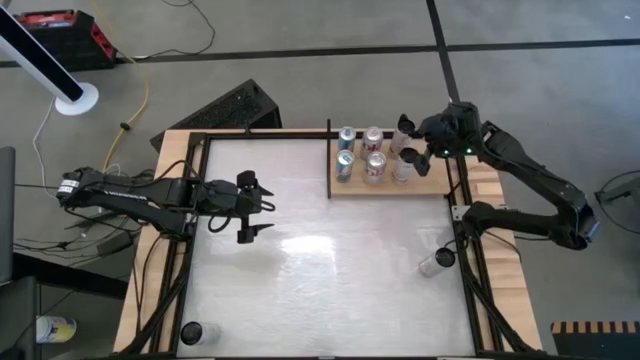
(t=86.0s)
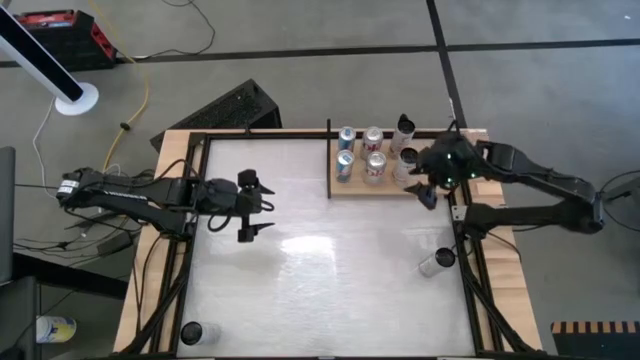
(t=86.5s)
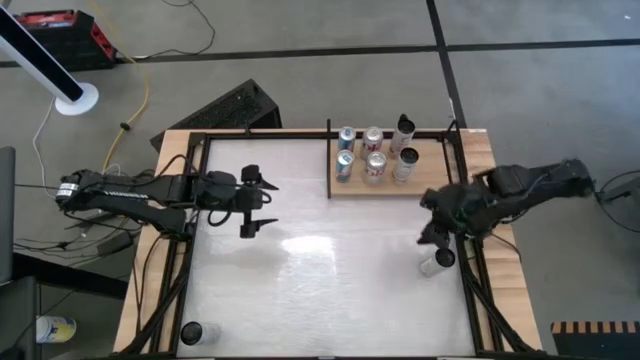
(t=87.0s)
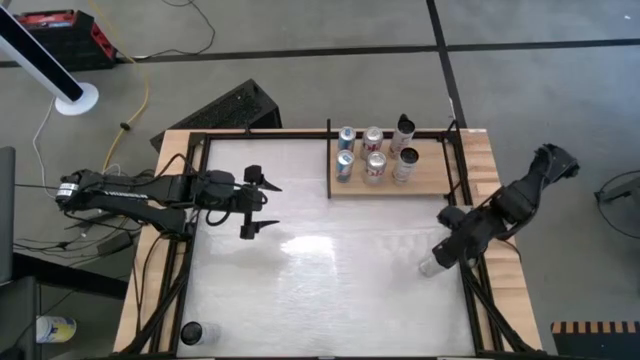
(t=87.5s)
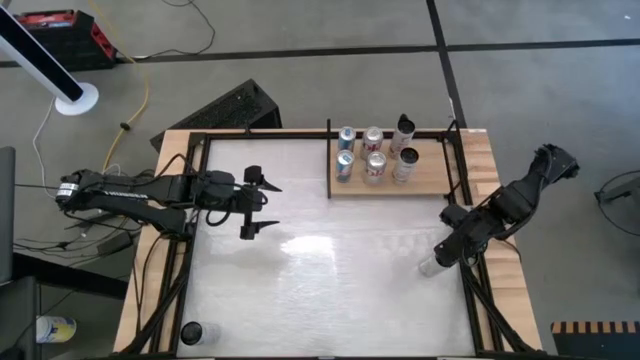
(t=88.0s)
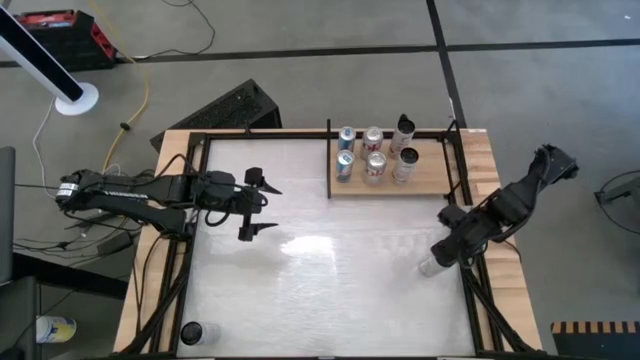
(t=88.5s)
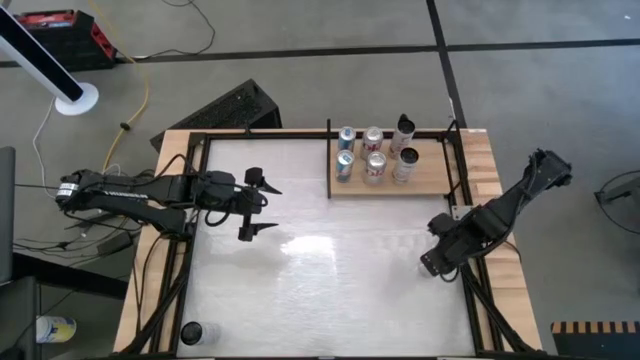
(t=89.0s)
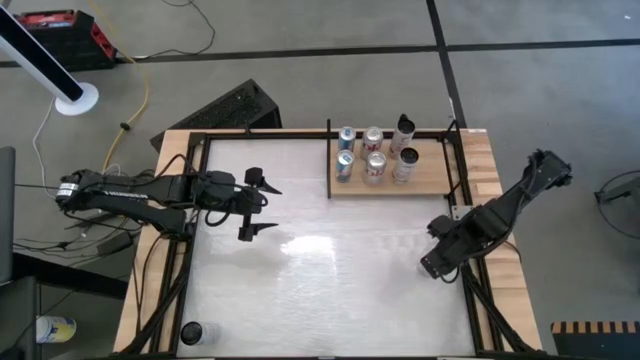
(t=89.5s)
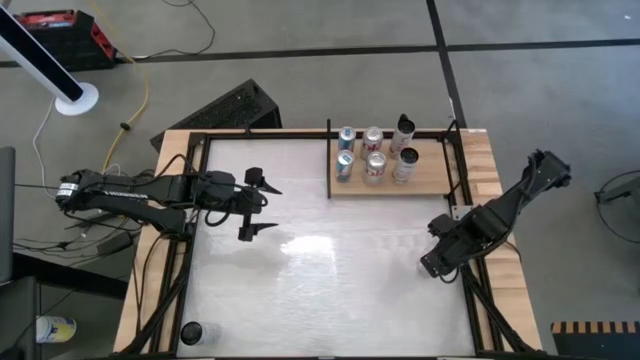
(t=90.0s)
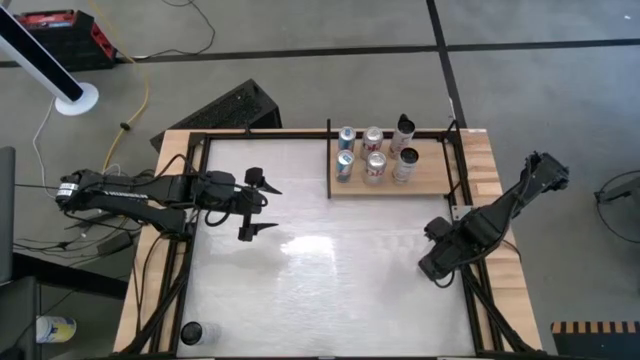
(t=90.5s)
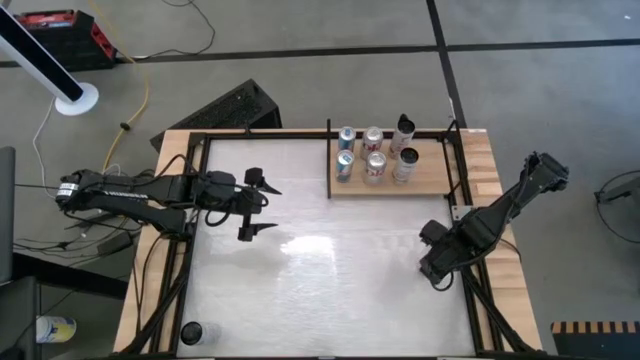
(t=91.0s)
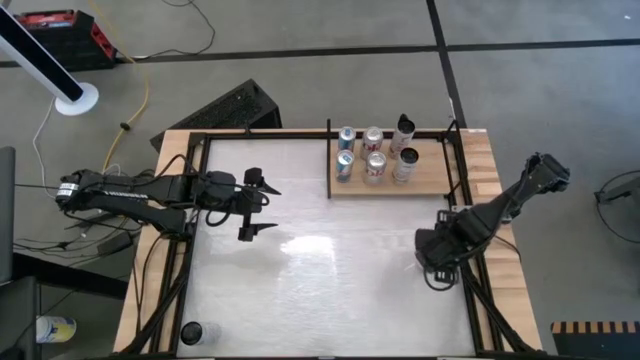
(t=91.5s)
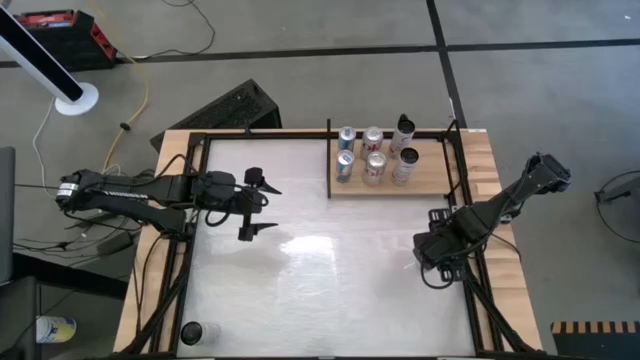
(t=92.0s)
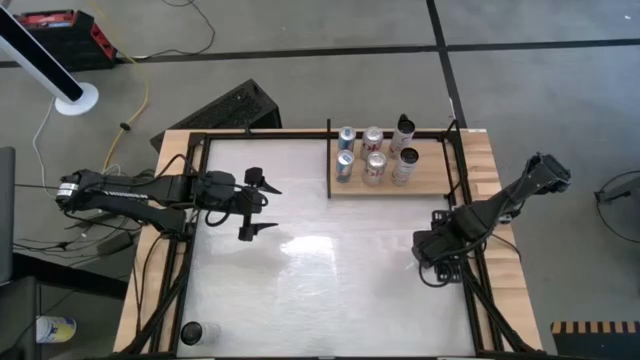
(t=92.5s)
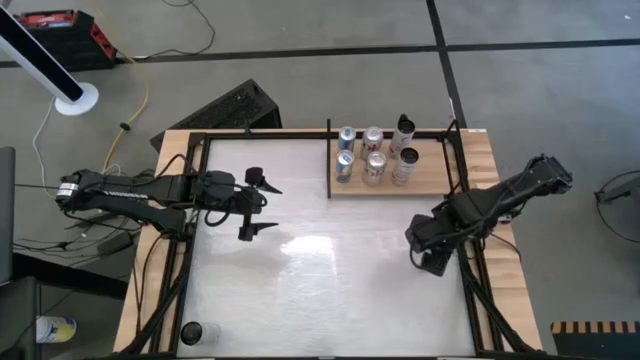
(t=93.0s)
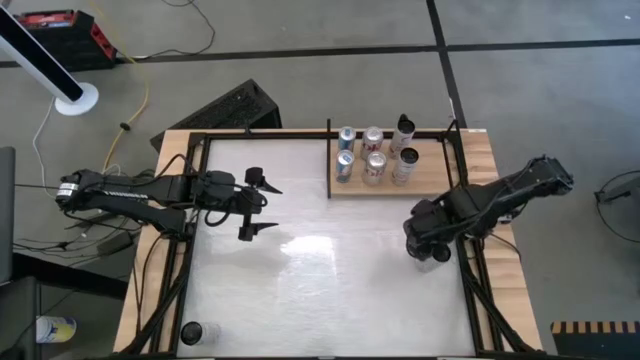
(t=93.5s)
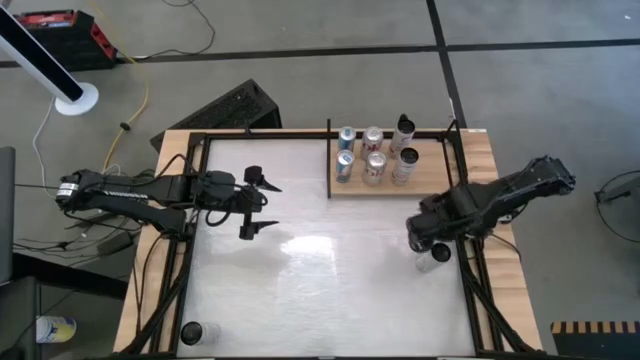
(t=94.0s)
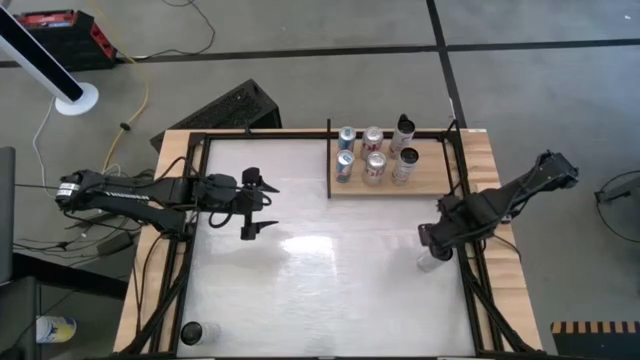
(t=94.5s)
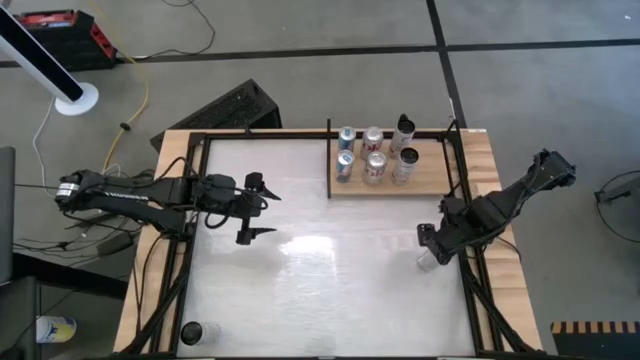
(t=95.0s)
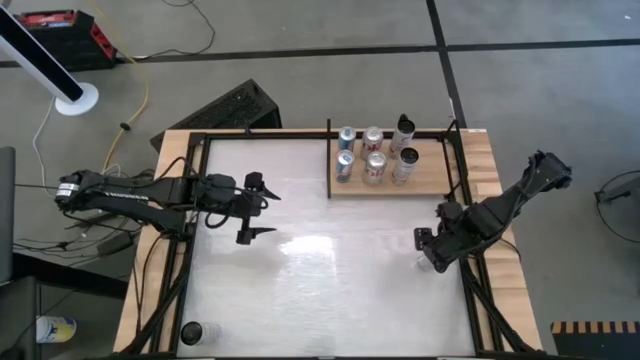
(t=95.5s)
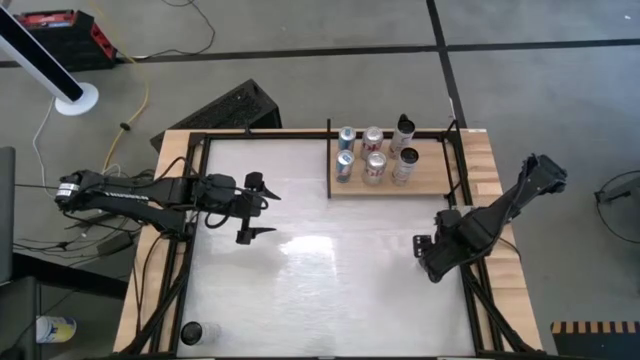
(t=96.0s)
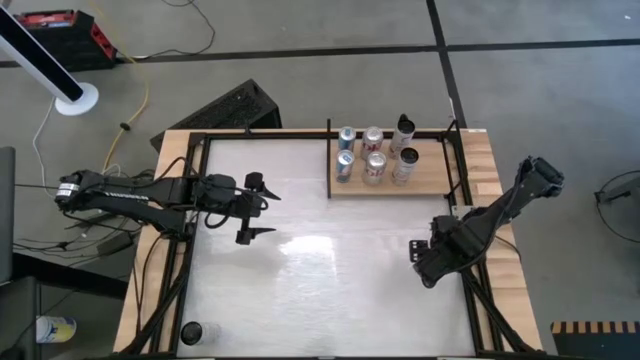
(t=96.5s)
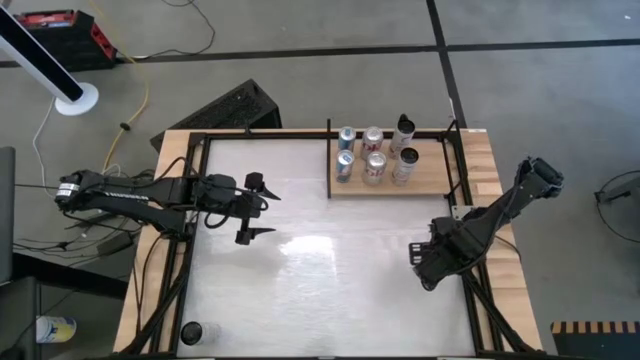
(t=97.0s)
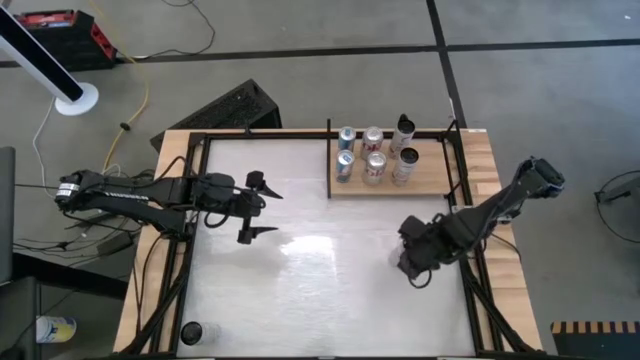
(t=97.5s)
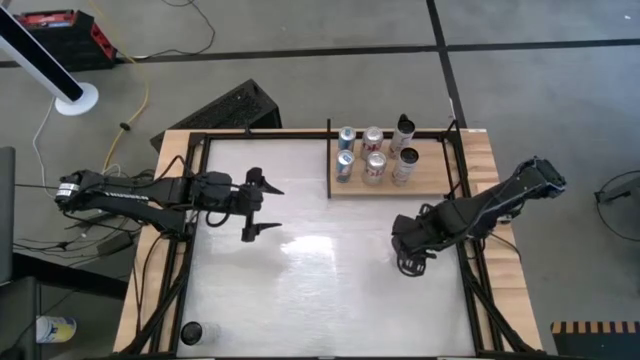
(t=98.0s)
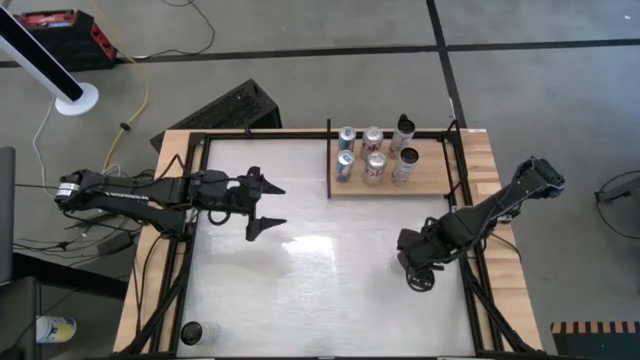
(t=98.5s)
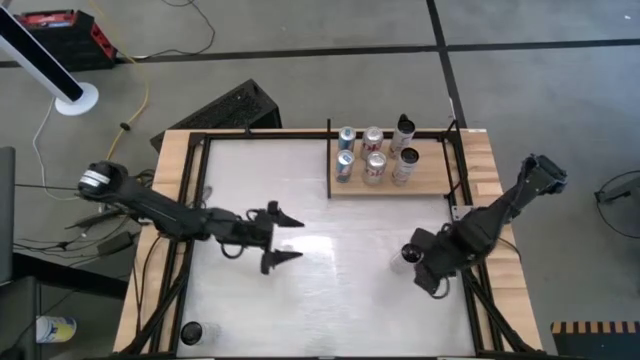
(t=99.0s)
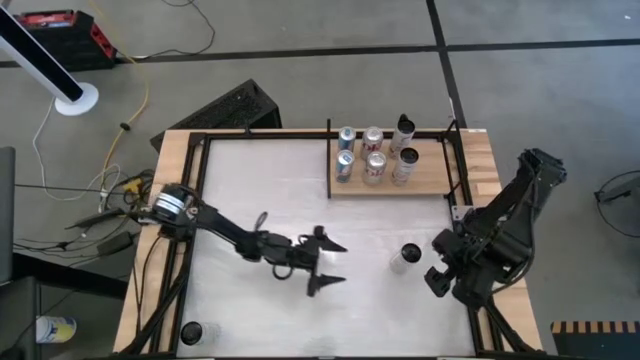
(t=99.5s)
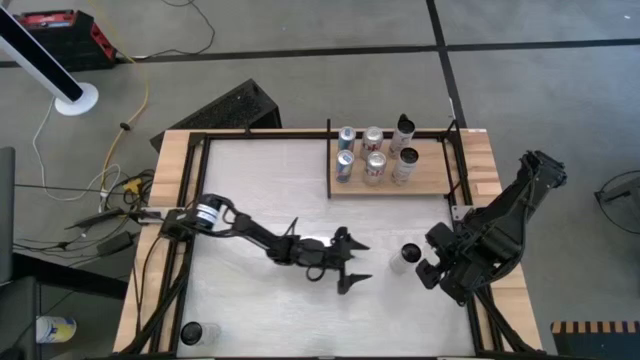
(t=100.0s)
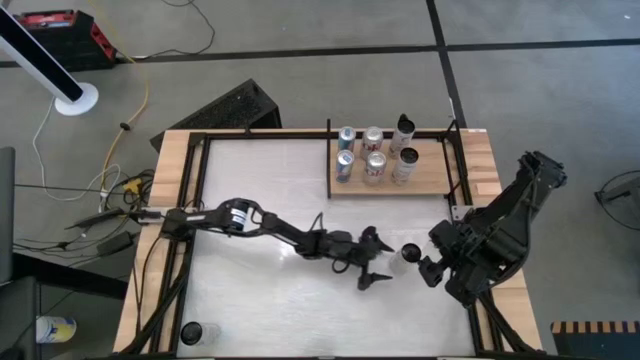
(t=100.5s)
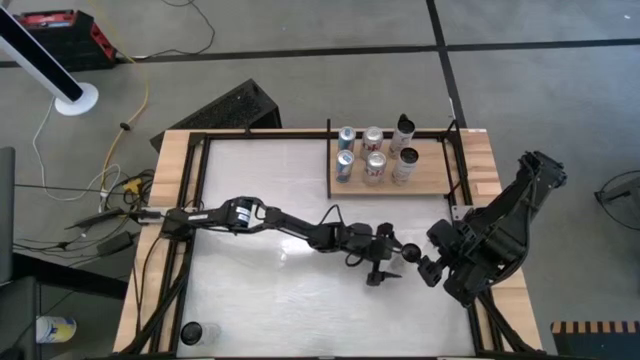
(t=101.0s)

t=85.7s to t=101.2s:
Task: Place canned beverage on shelf
Put the right white-yellow soda can

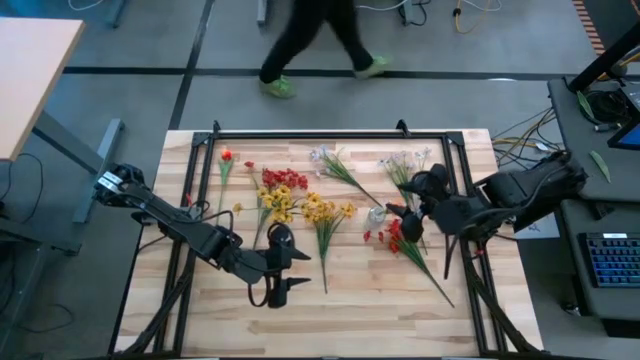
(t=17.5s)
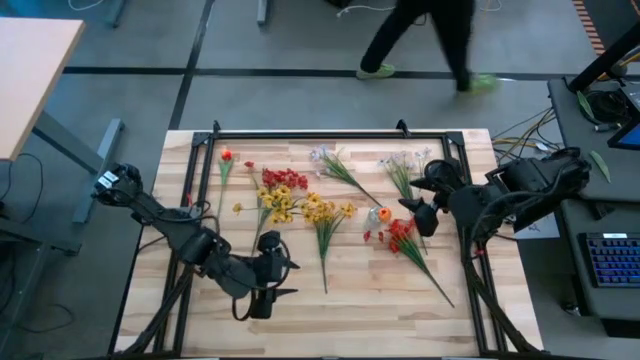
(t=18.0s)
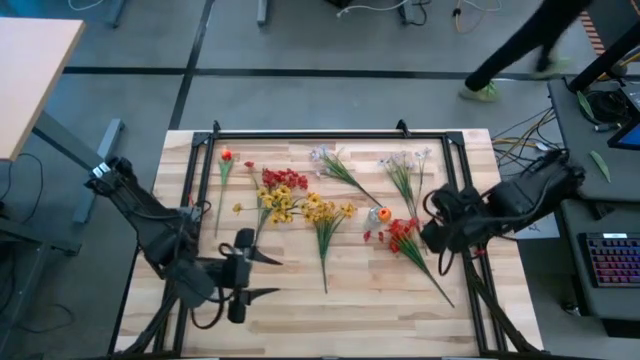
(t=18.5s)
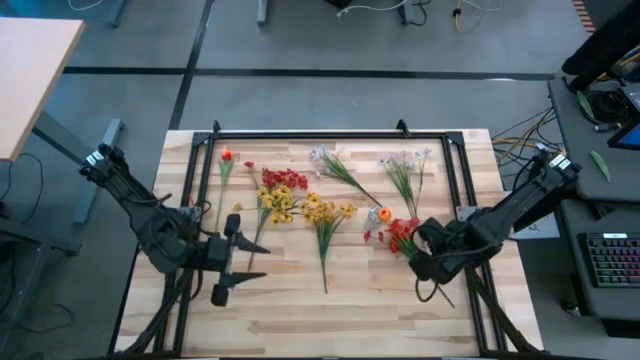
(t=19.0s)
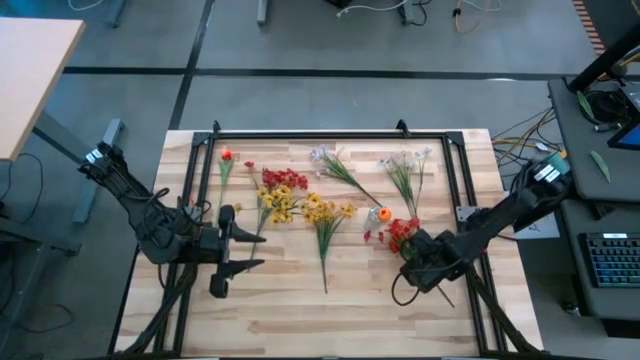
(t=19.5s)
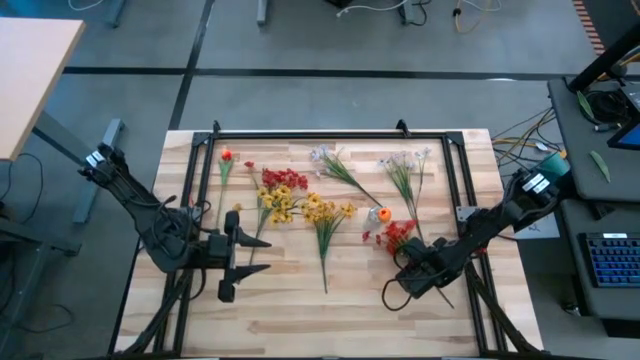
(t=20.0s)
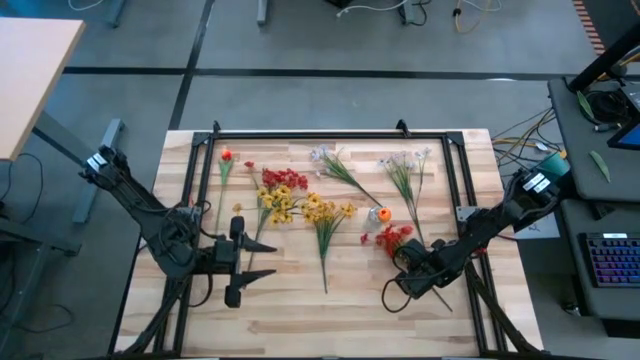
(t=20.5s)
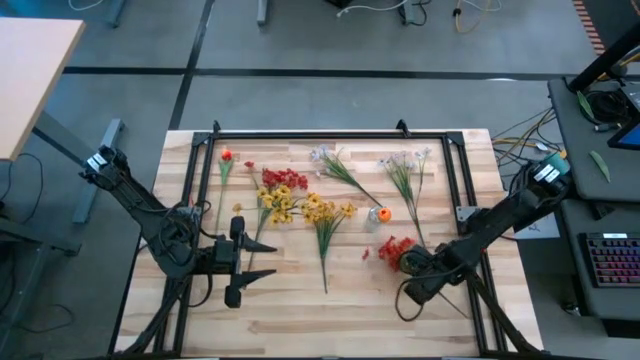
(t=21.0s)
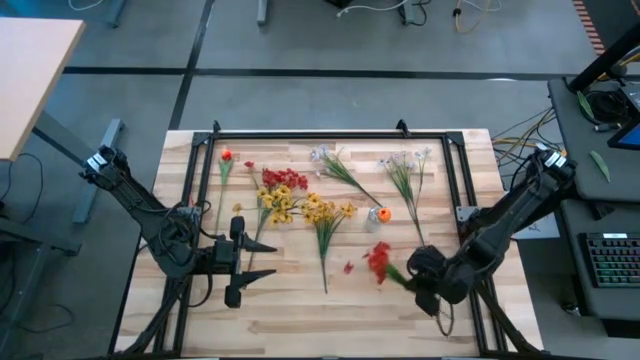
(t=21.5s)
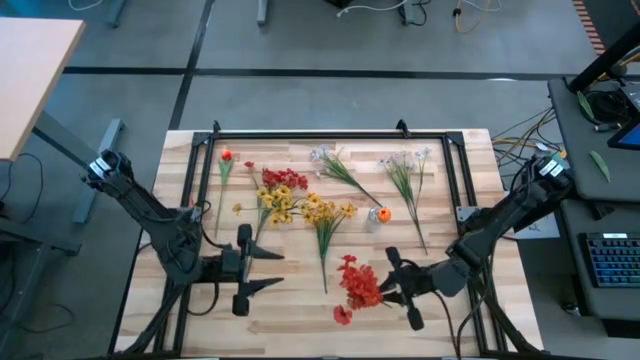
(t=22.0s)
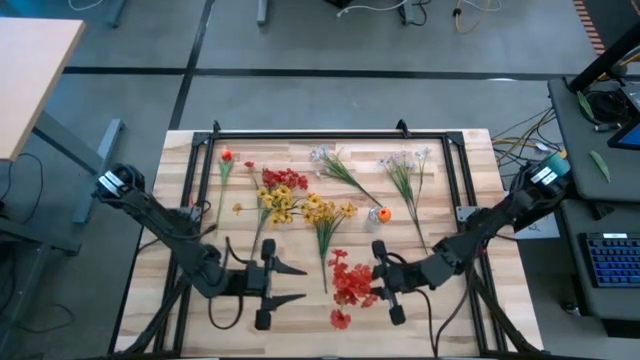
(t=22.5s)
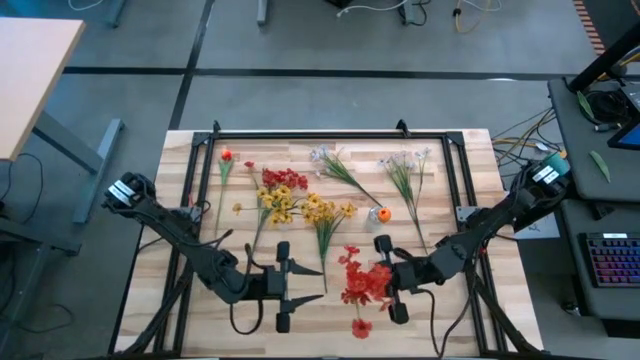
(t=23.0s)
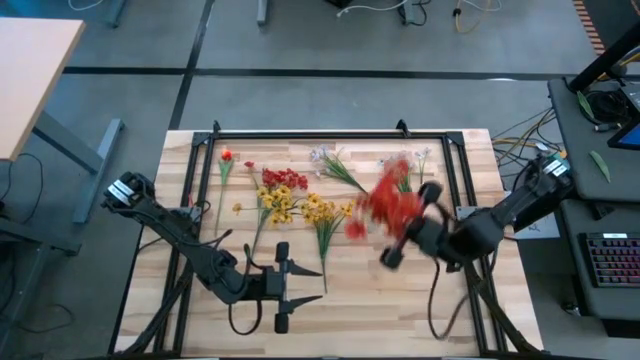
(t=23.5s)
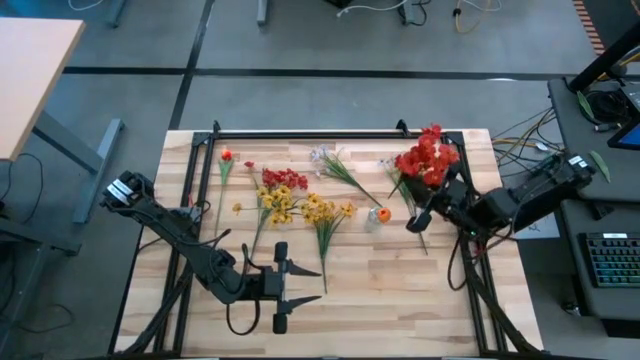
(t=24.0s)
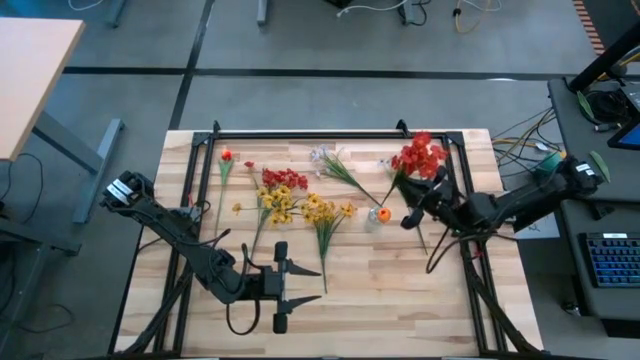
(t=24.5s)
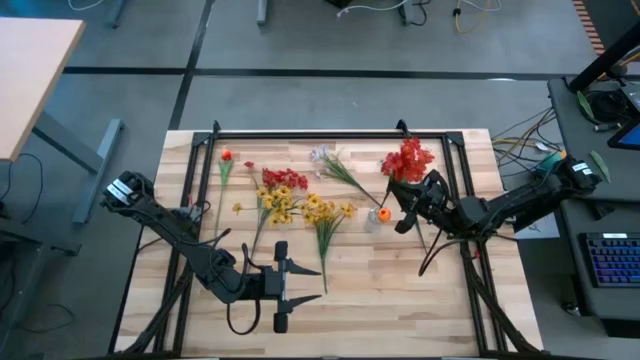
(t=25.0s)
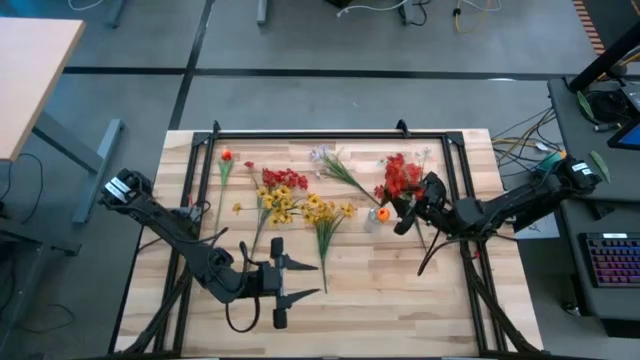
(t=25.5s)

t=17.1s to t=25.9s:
Task: Sort flowers into vase by color
Put the right red flower into the right transparent vase
